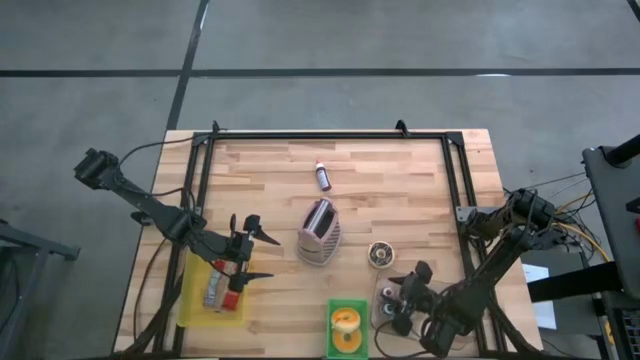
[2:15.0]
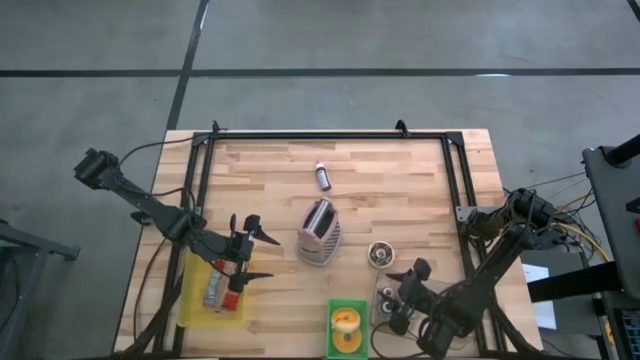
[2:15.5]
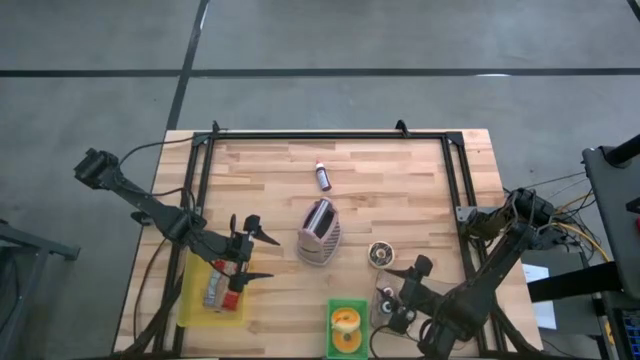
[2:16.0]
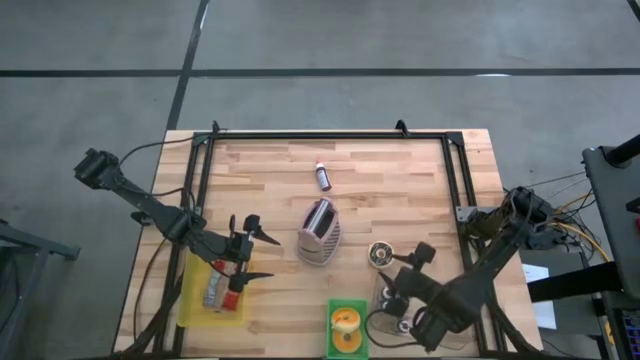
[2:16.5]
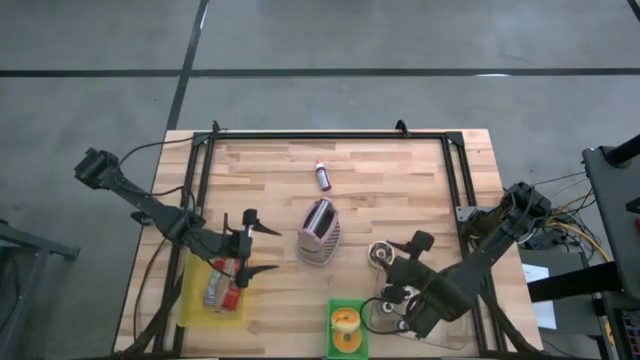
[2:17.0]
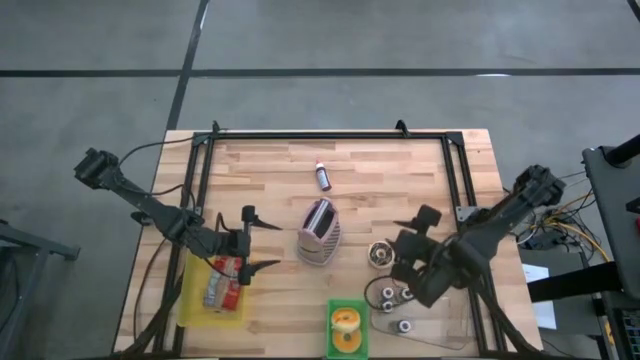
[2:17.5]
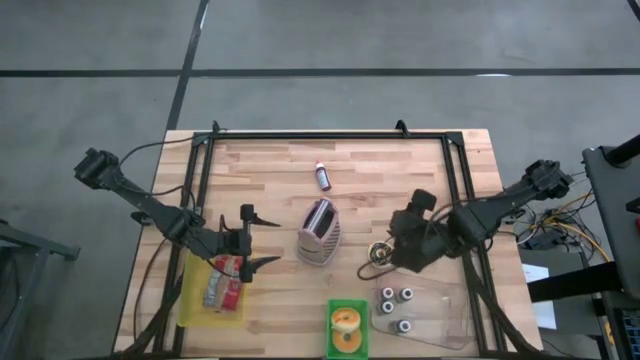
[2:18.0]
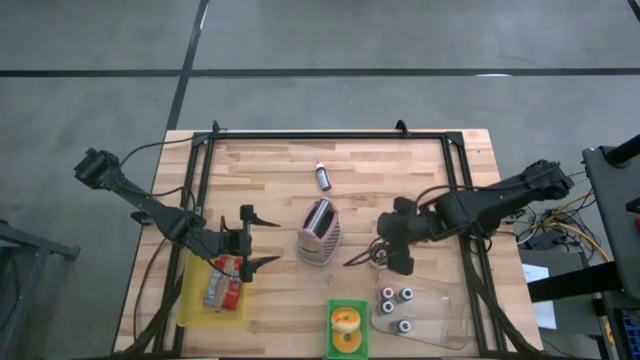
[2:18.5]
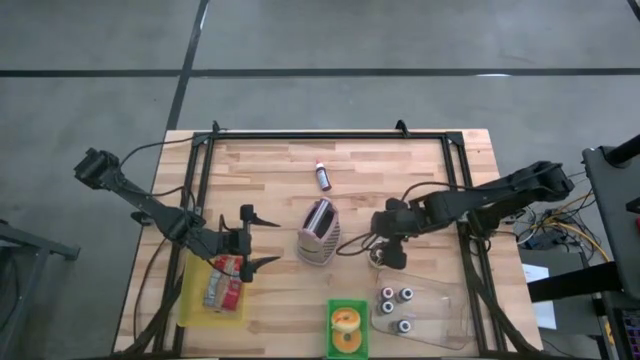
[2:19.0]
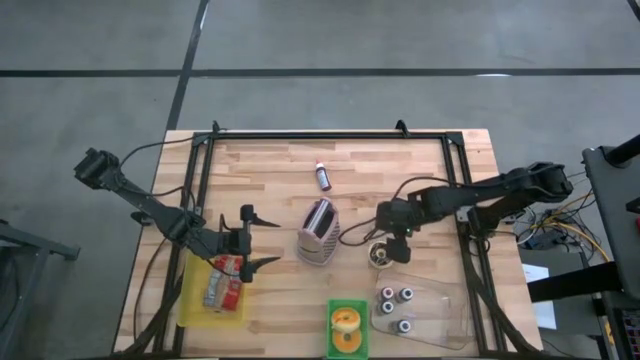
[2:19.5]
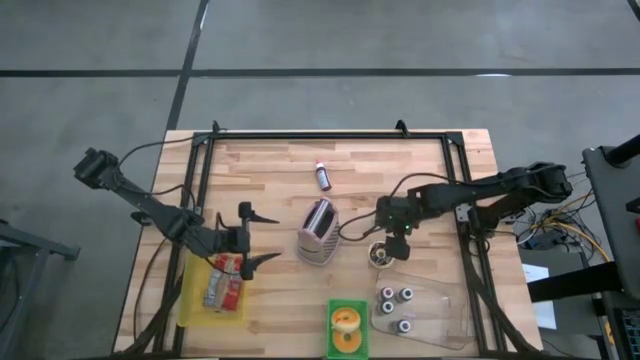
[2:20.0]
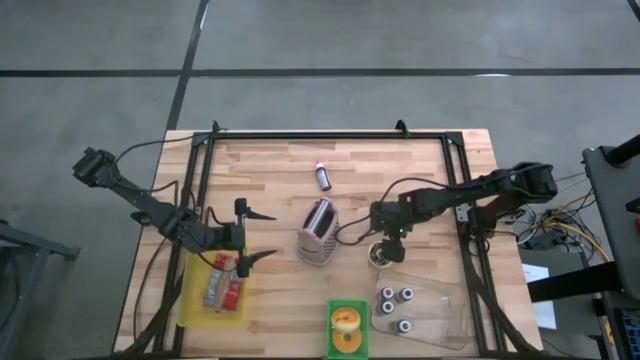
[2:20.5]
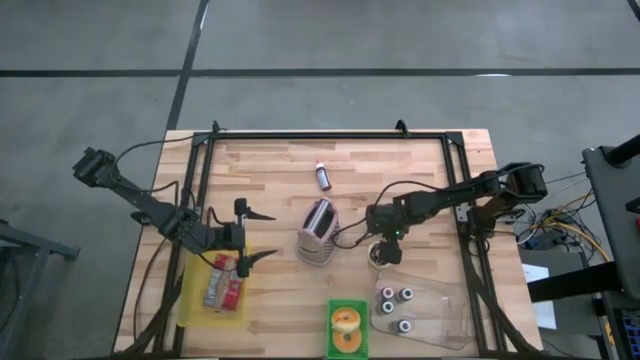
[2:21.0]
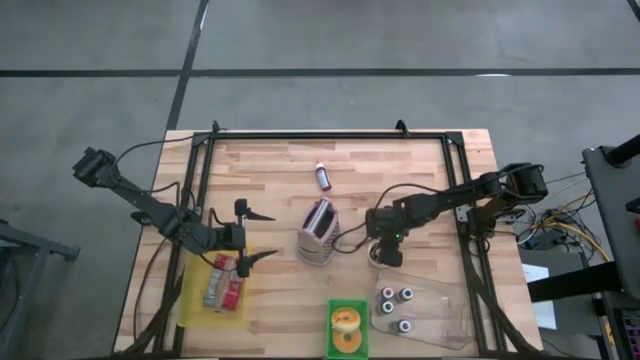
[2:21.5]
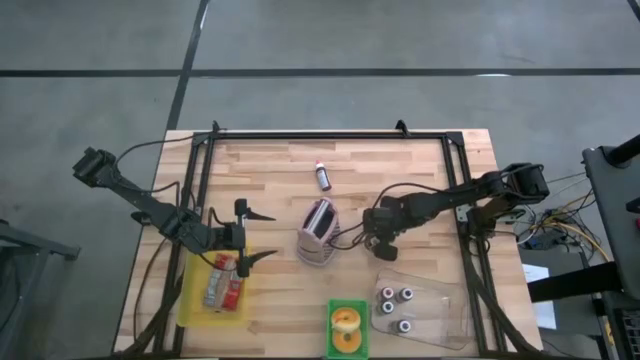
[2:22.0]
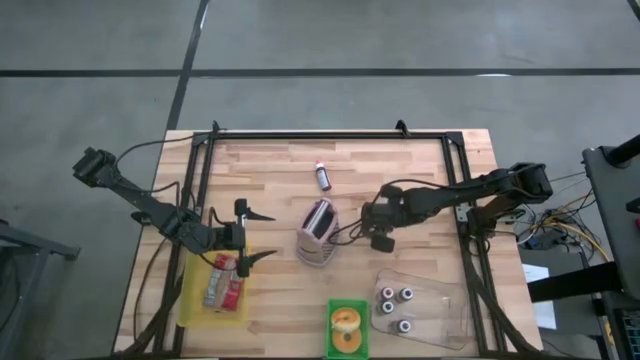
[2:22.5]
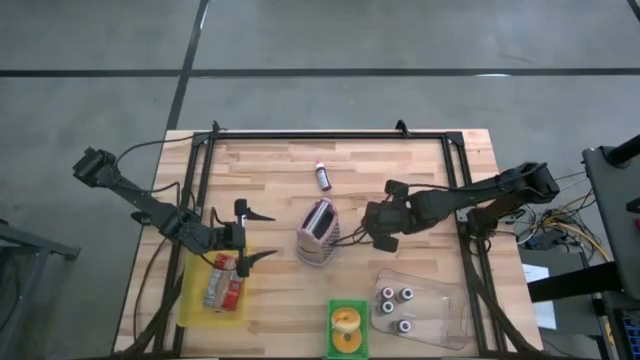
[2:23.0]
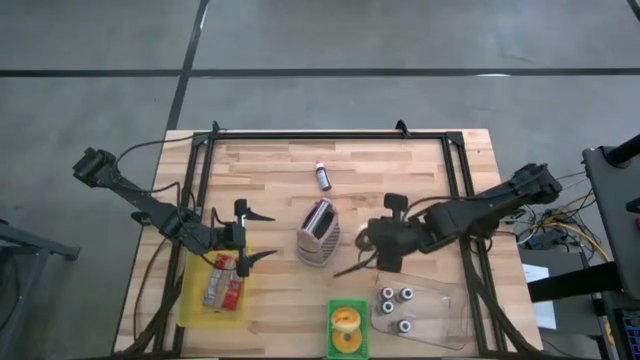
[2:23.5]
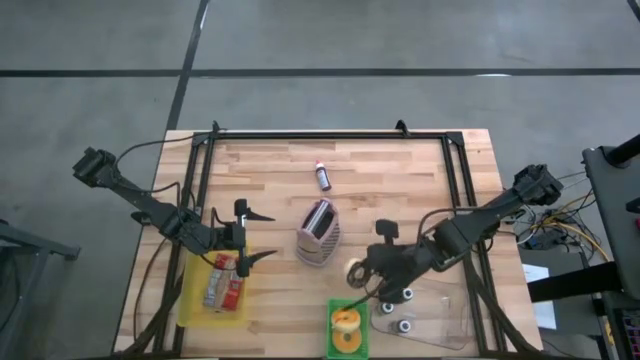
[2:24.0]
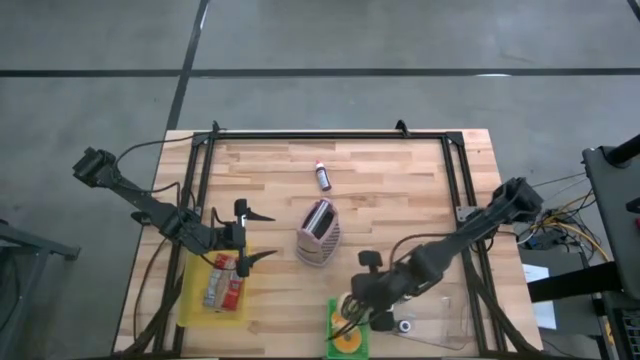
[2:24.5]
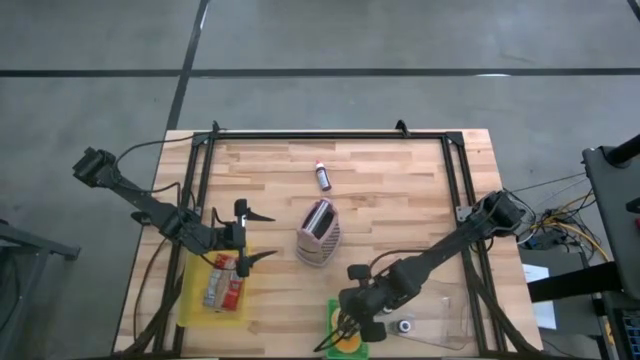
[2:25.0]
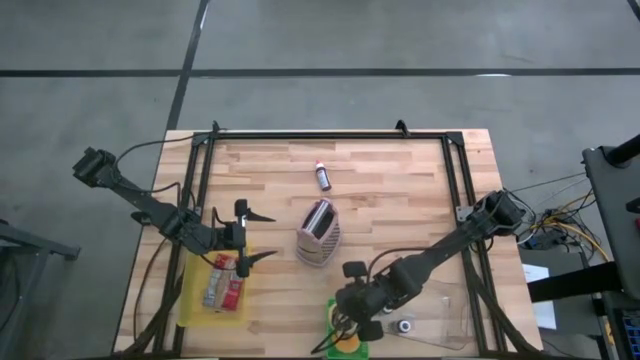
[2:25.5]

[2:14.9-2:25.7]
Task: Pick & Place Food Item
Put the black donut into the green bin

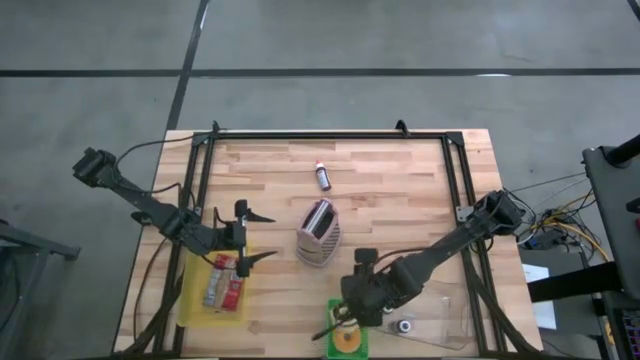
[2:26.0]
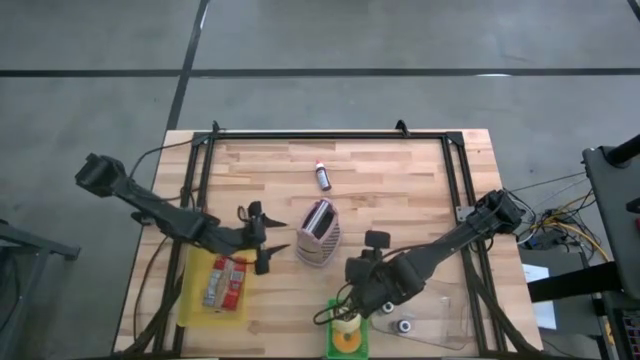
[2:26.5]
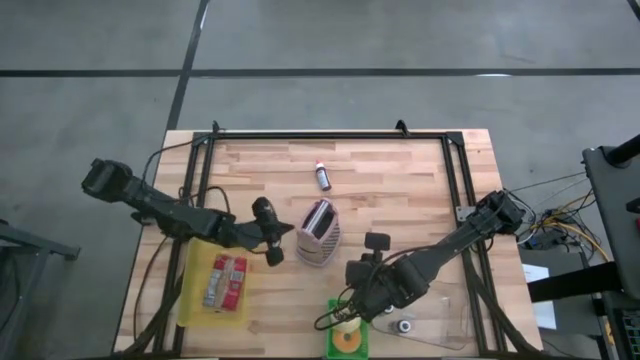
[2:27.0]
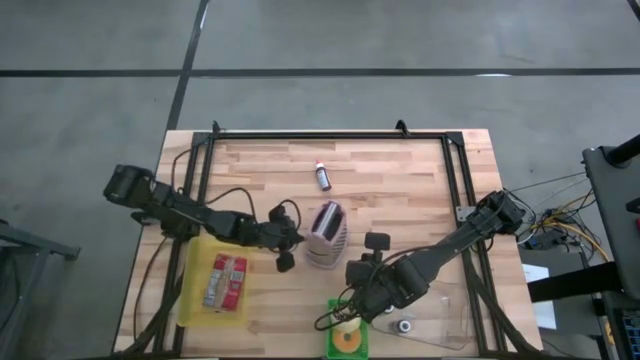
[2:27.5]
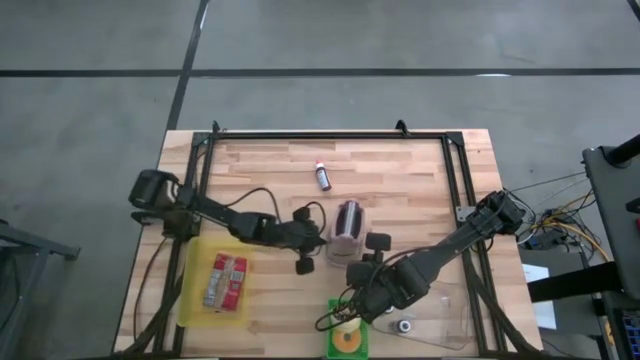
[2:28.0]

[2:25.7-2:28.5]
Adjust the cheese grater

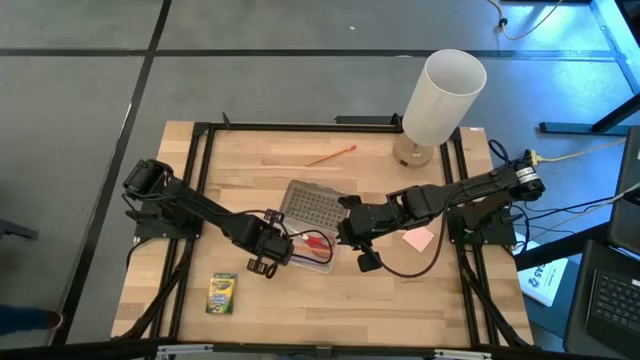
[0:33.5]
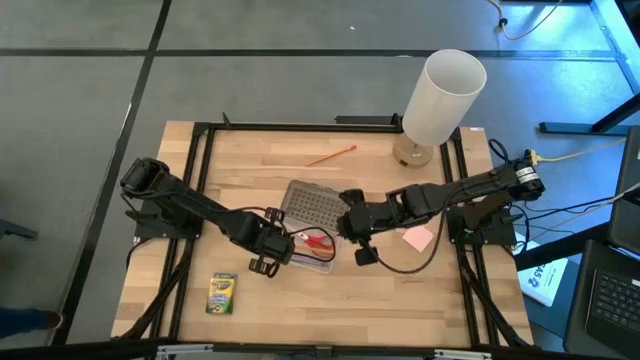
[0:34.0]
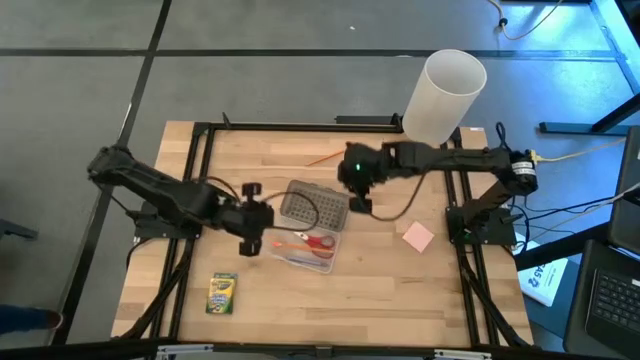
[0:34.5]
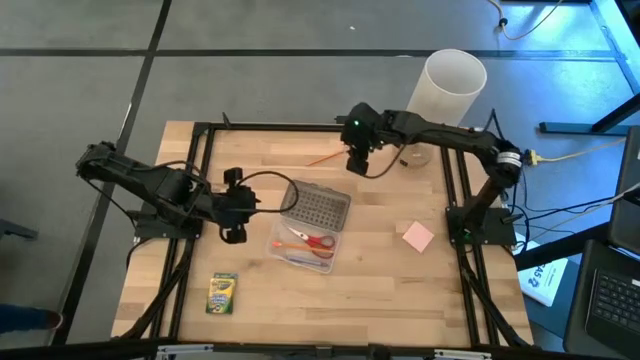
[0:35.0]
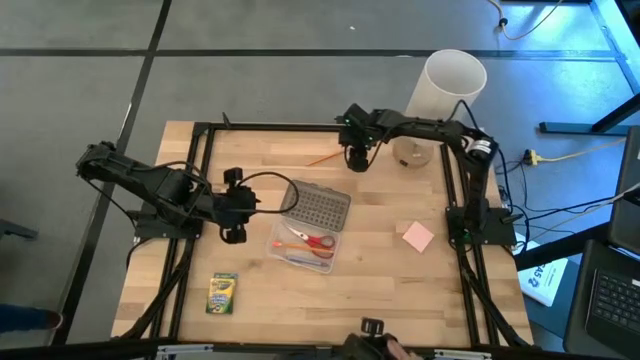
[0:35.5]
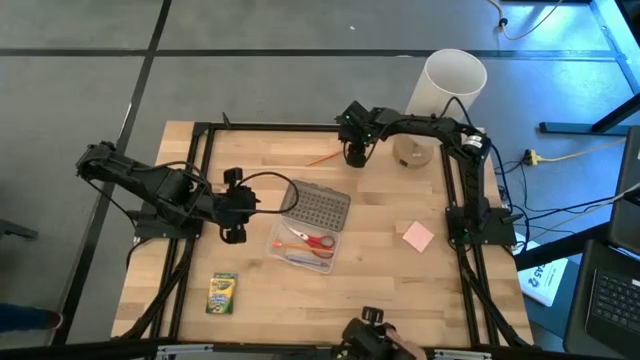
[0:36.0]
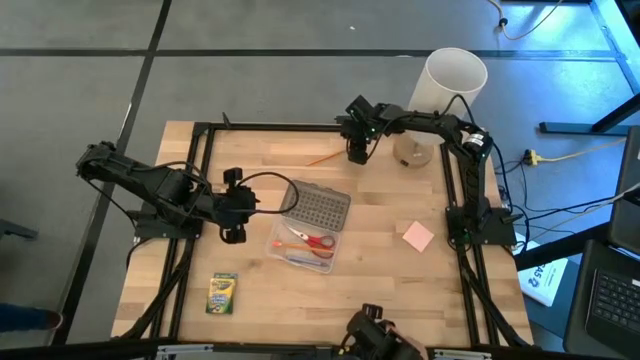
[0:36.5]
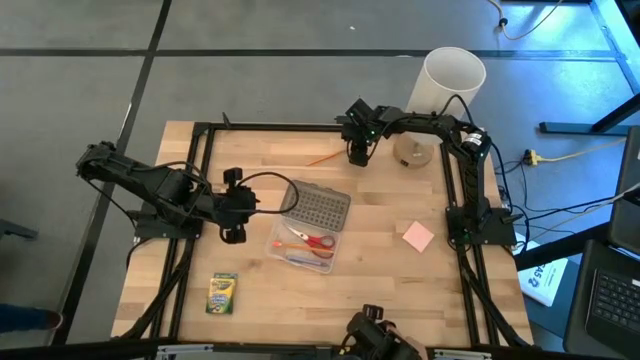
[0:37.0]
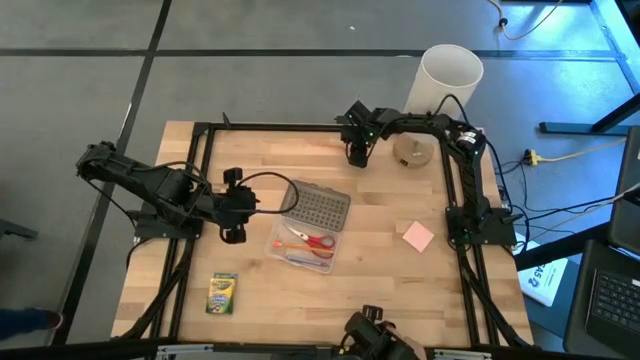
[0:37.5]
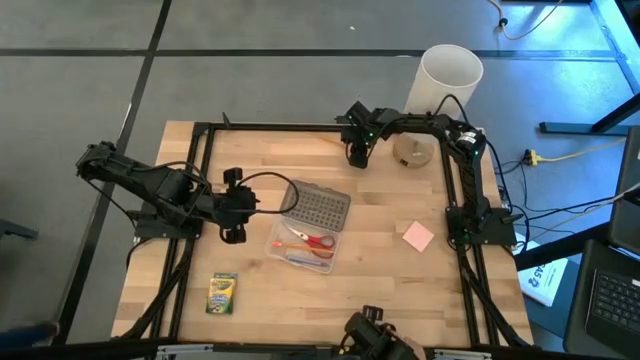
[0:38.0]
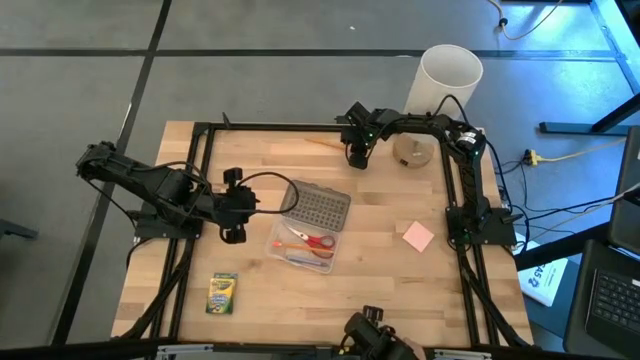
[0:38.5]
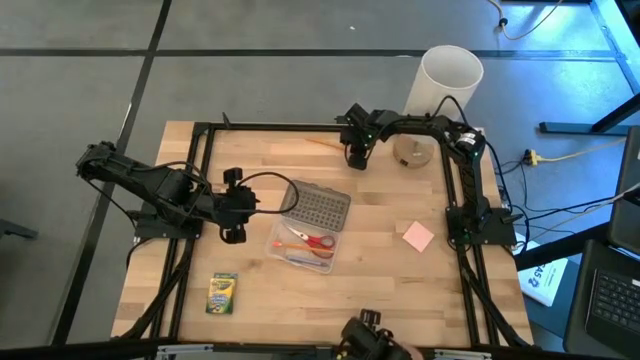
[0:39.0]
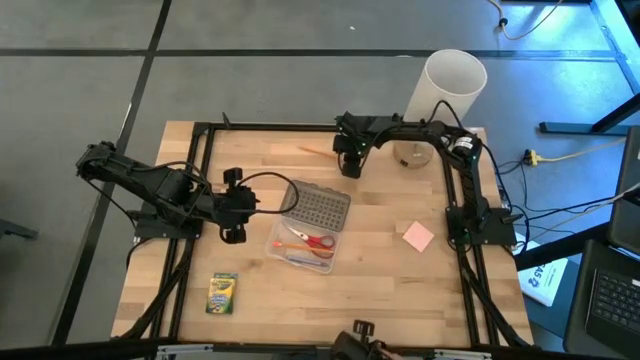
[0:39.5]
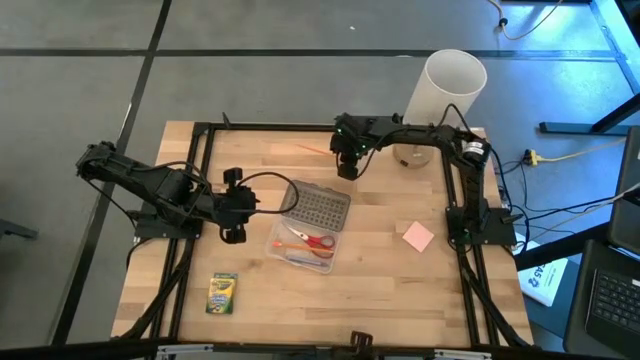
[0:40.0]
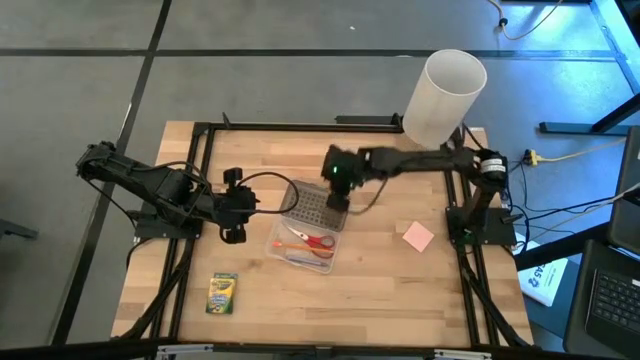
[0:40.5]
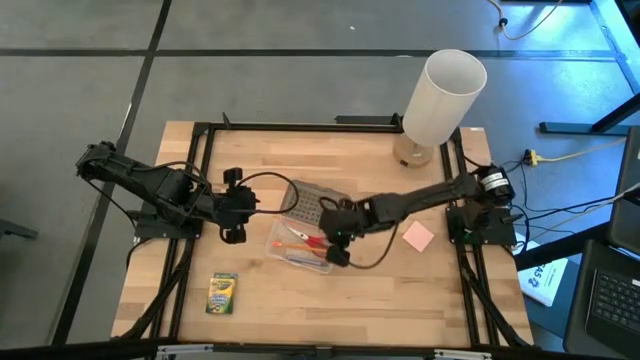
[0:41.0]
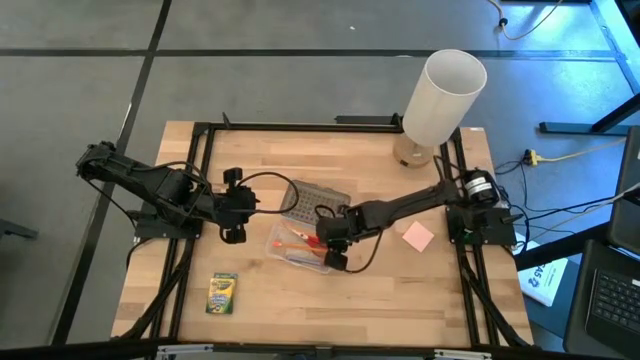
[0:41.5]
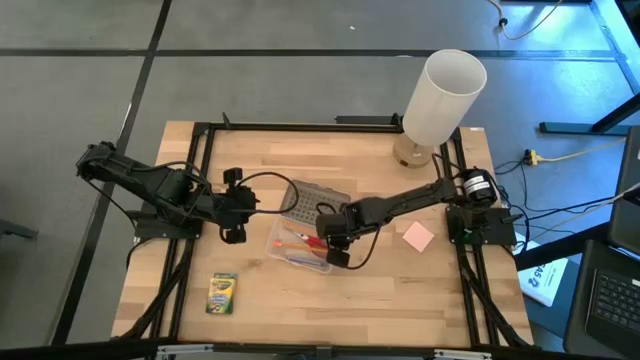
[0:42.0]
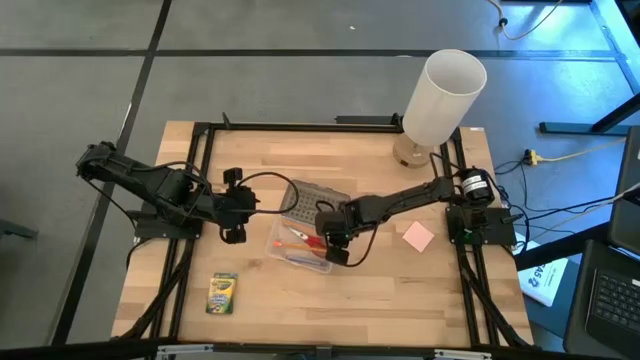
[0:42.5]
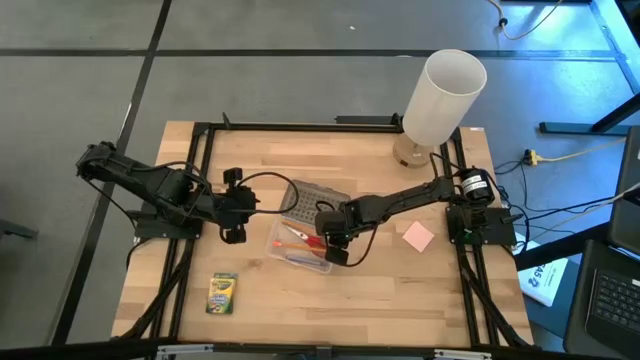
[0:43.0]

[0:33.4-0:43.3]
Task: Pack school essentials
Put the yellow pencil into the black supply box
